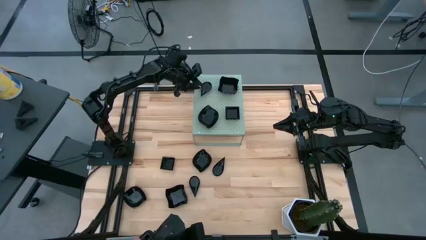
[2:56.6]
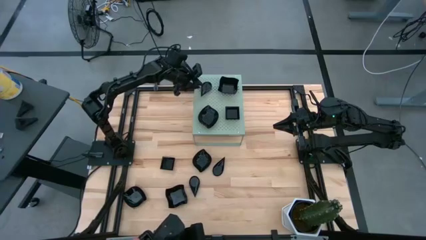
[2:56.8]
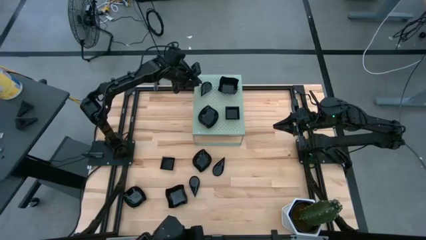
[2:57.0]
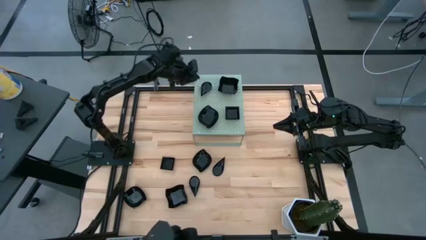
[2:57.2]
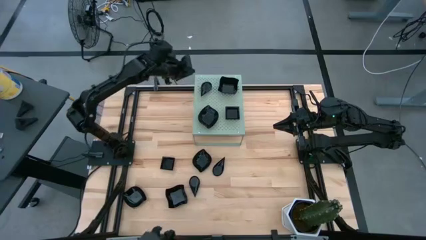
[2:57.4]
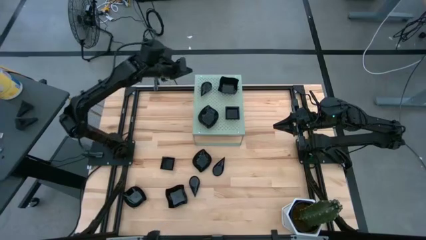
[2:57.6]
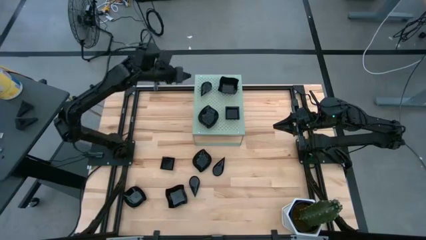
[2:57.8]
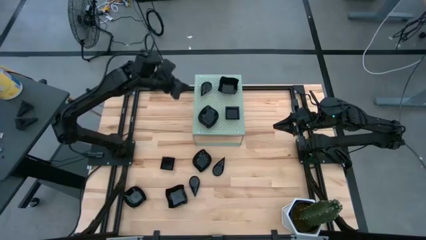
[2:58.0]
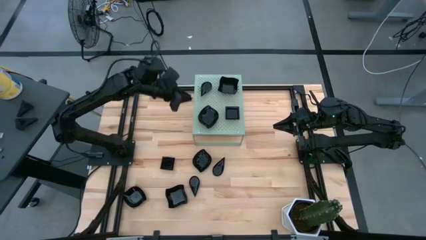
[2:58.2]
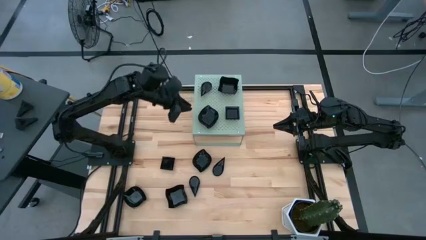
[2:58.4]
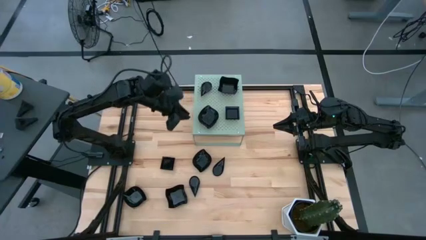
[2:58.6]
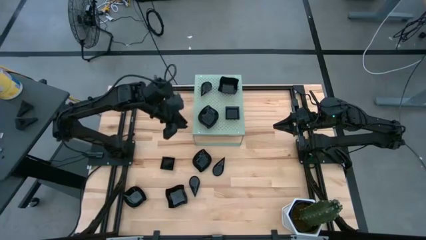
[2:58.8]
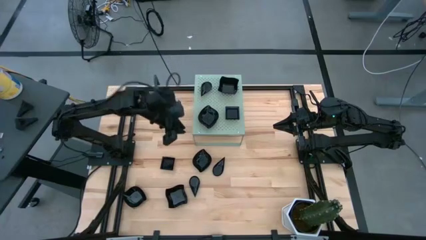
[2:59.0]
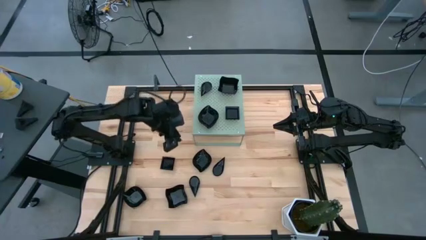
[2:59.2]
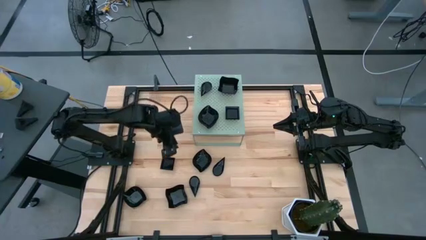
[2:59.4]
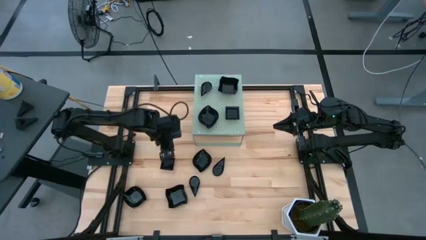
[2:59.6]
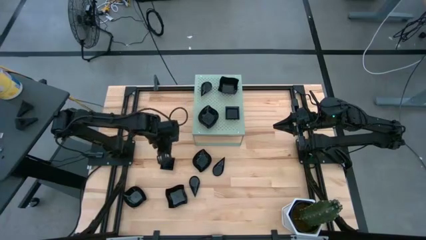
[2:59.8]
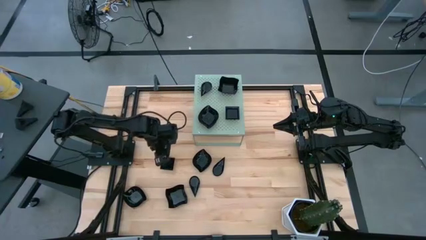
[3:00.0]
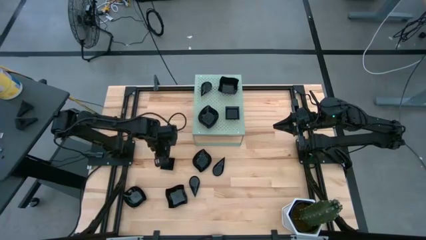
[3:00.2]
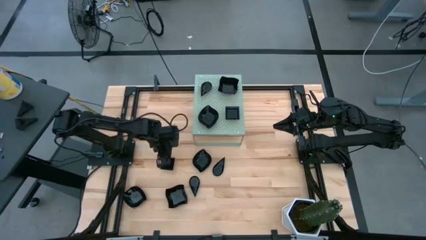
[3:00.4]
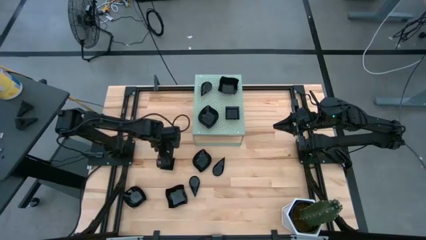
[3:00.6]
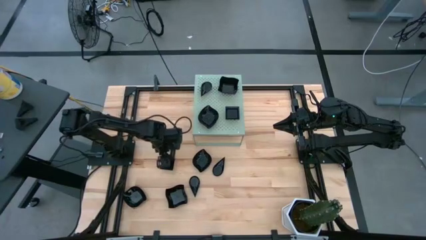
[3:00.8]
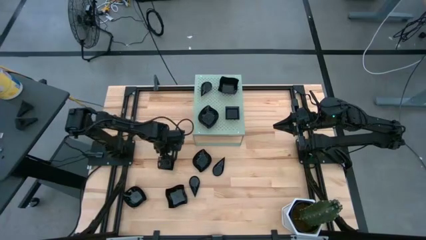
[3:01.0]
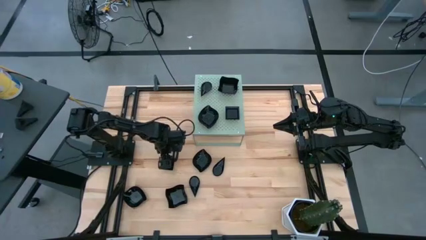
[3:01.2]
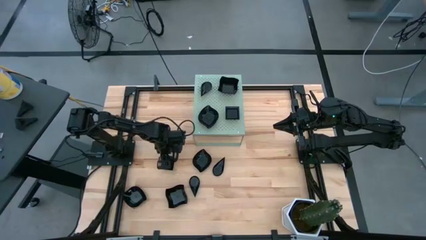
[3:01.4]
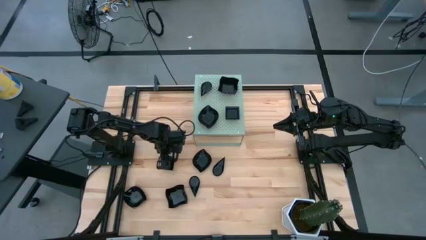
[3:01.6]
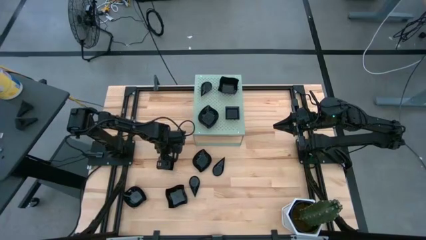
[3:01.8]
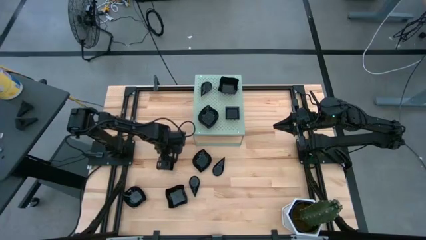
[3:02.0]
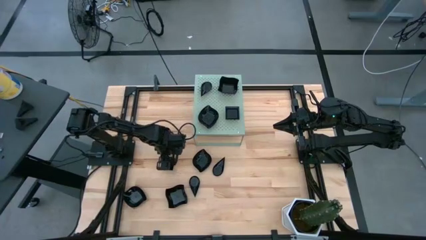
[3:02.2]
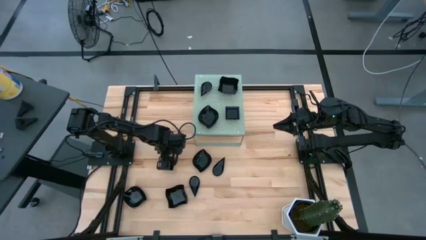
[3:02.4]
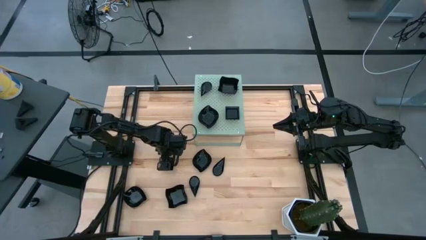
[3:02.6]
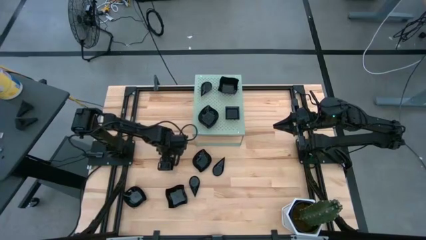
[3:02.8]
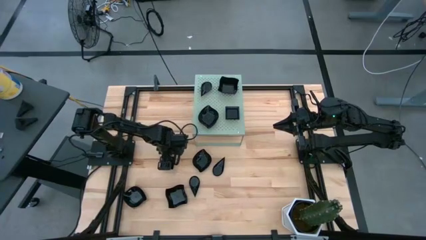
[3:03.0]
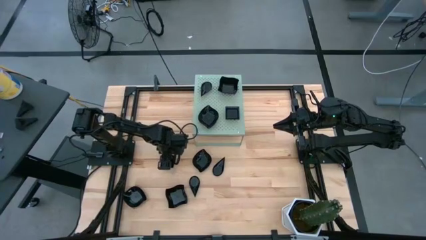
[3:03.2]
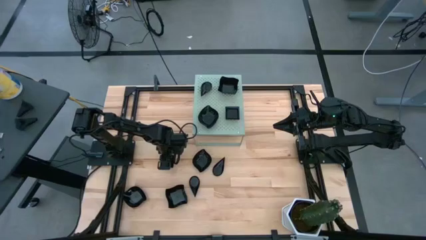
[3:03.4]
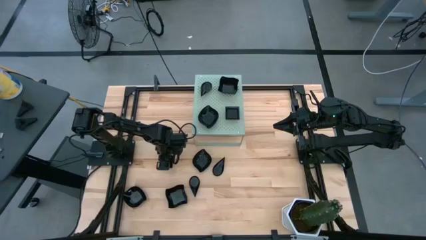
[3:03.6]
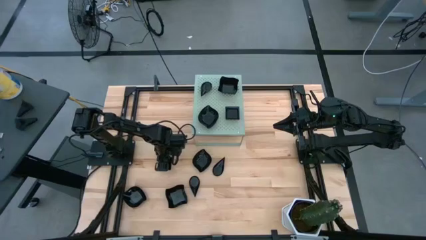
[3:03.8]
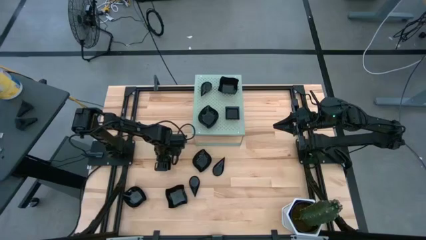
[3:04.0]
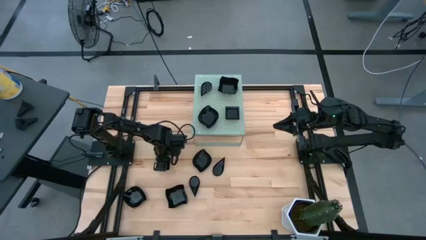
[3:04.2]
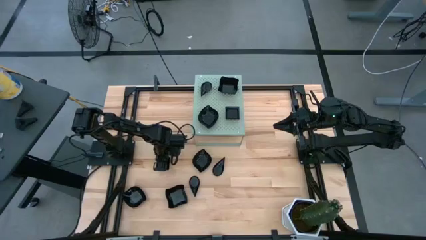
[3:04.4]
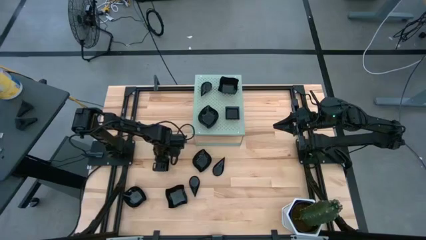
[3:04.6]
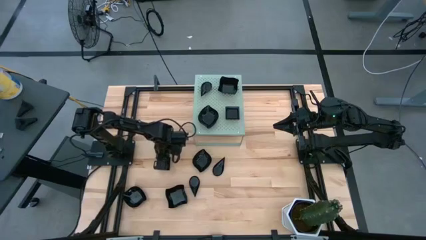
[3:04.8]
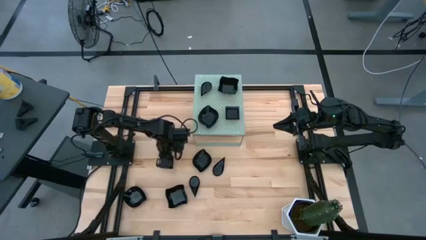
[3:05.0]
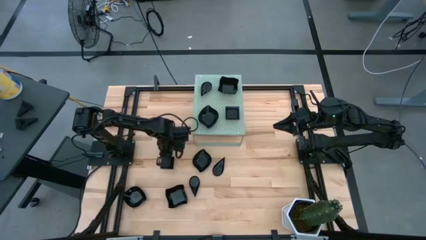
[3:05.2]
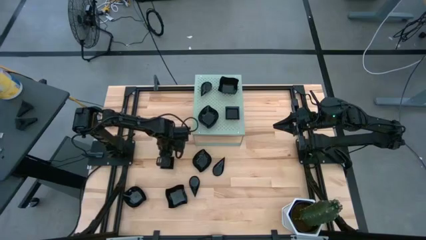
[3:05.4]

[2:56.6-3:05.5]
Task: Pick & Place Mini shaped plates
Stack the square plate on top of the square plates on the shelf

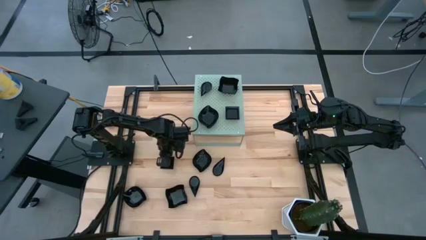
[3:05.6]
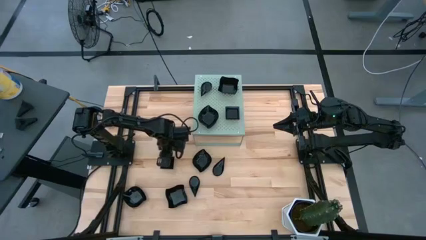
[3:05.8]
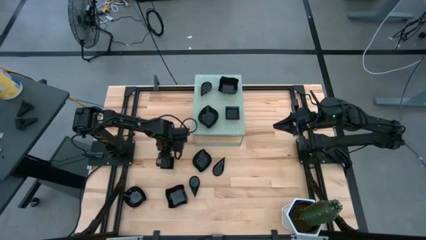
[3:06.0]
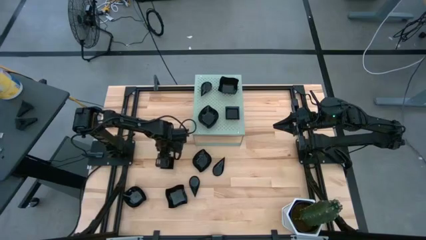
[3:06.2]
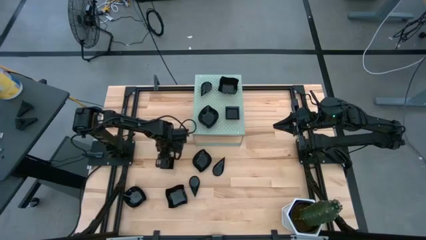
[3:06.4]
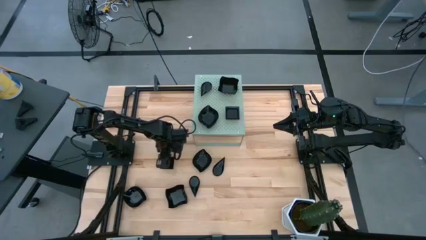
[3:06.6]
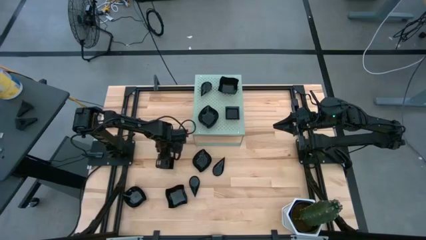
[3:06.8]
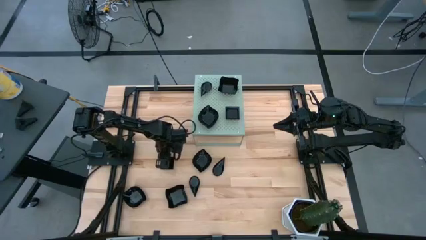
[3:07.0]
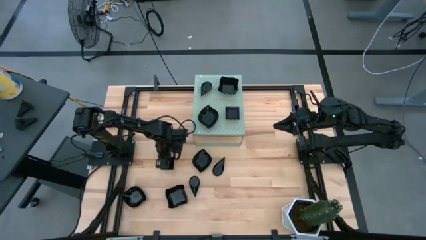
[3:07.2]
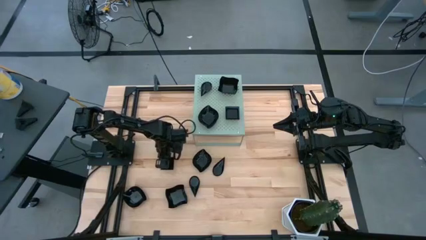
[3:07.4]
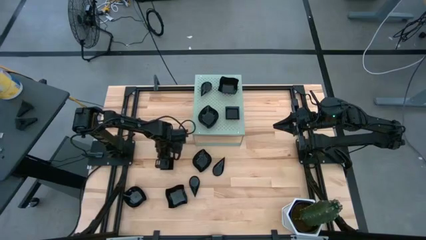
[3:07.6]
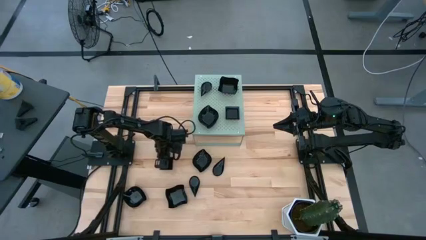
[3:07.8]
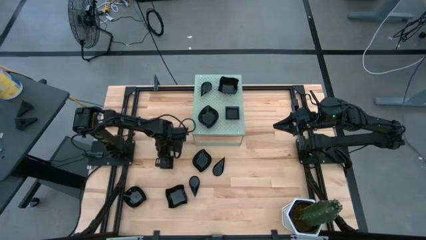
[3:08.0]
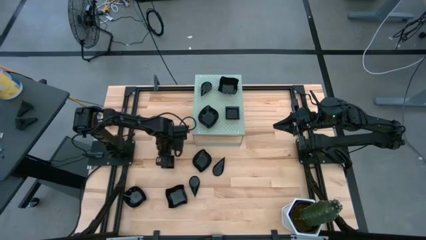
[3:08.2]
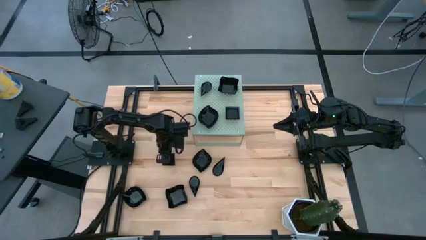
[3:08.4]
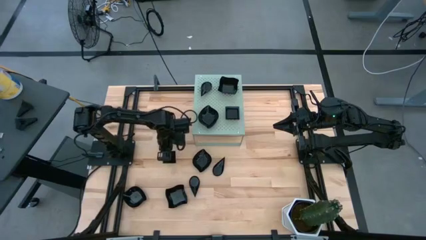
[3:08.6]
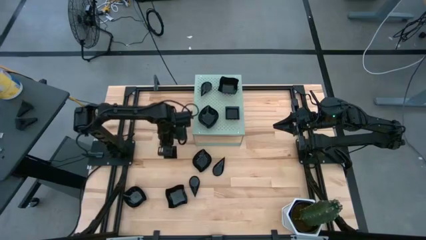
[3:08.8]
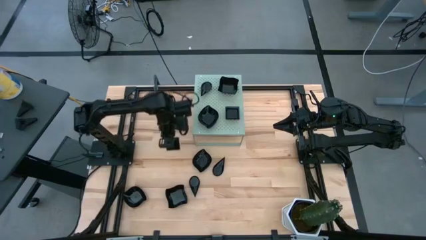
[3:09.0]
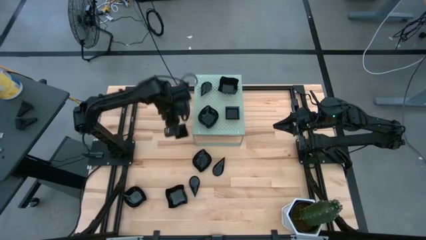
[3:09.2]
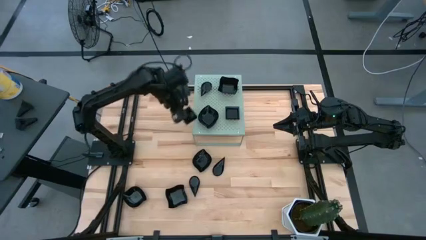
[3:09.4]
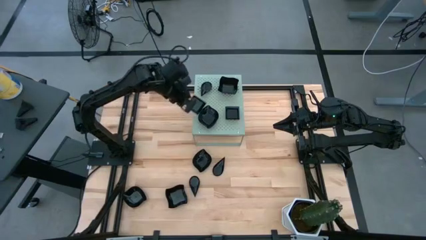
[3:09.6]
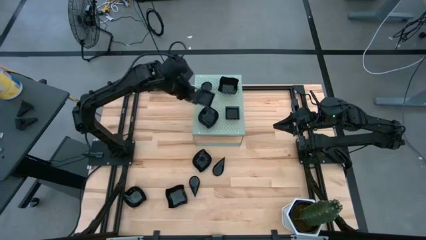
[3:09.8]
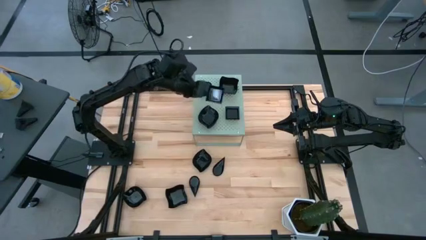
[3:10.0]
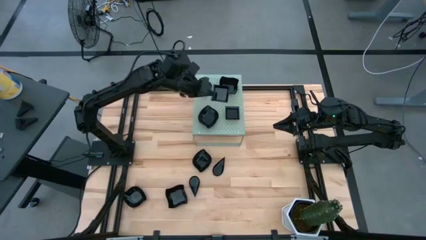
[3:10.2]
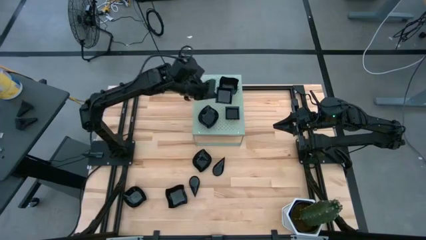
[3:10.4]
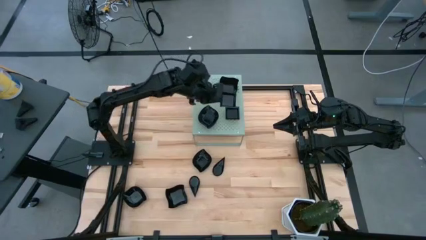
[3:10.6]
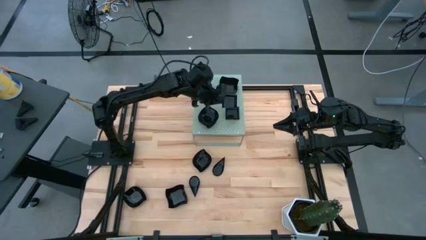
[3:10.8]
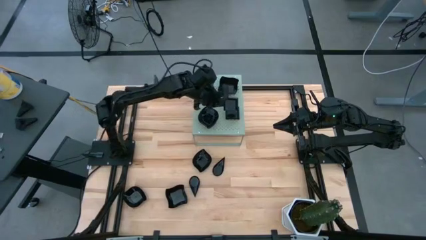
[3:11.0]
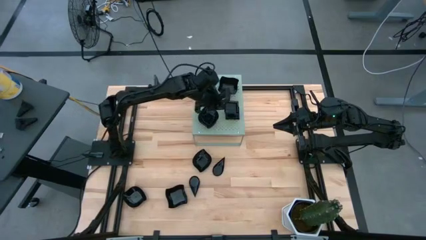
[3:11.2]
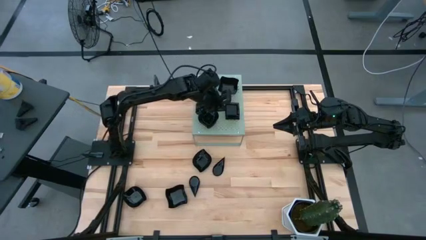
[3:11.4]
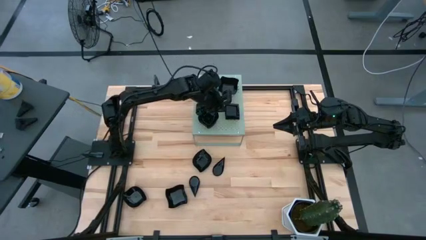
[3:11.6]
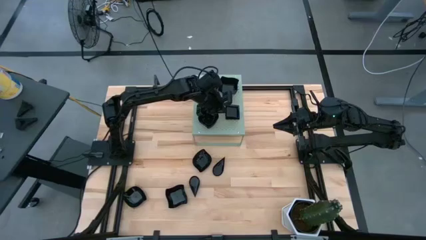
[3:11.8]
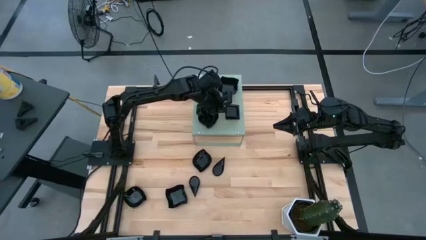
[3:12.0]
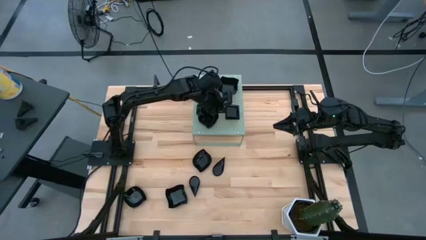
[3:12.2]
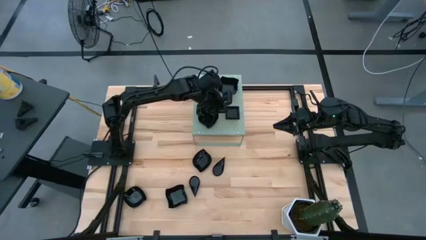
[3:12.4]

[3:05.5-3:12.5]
Stack the square plate on top of the square plates on the shelf
